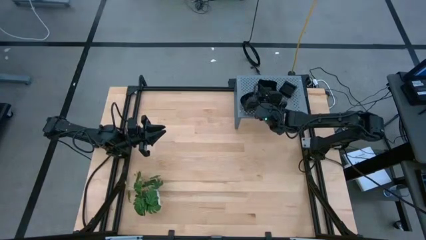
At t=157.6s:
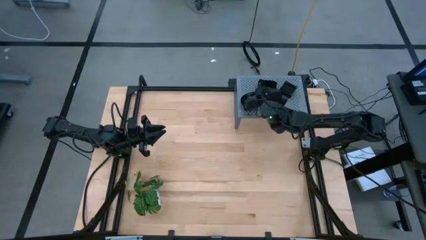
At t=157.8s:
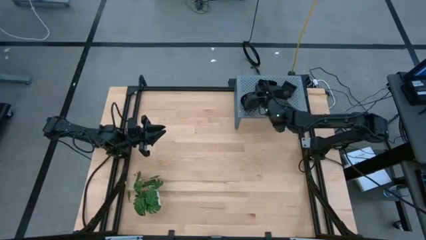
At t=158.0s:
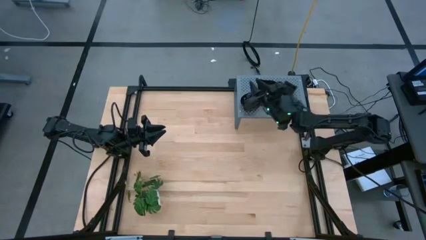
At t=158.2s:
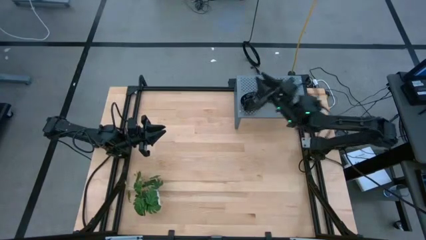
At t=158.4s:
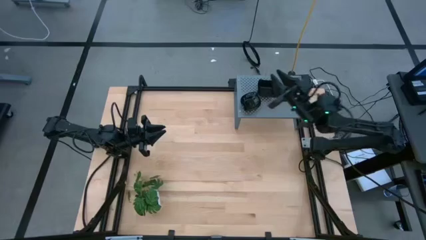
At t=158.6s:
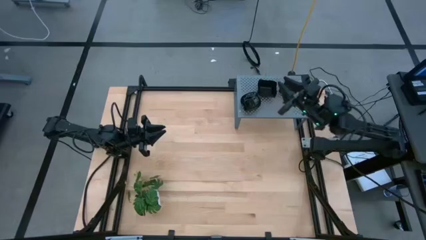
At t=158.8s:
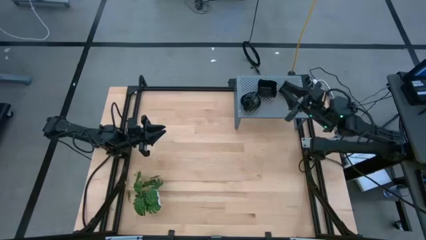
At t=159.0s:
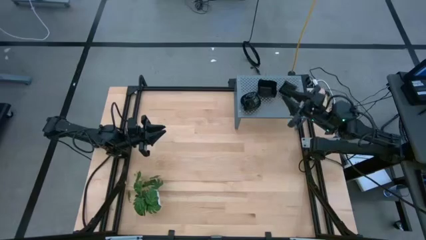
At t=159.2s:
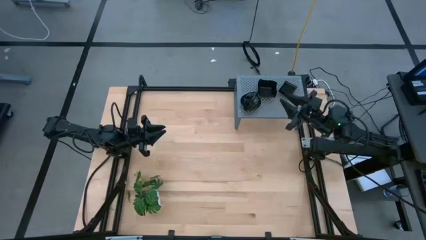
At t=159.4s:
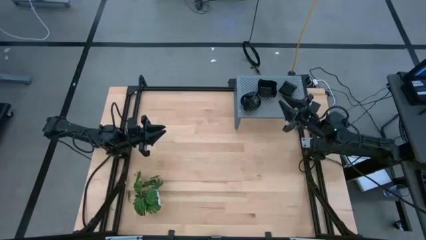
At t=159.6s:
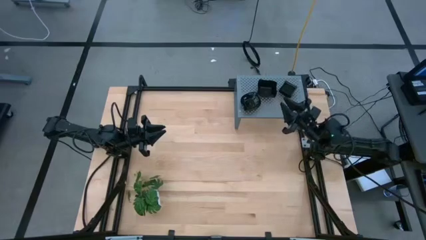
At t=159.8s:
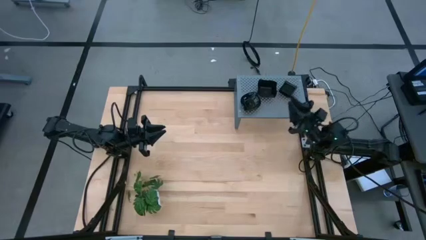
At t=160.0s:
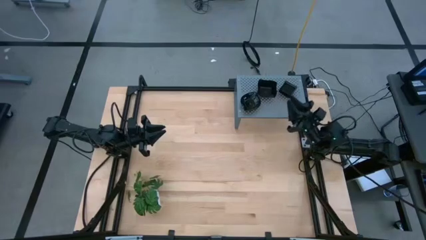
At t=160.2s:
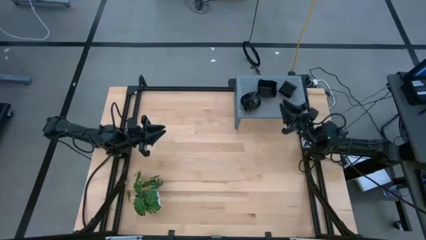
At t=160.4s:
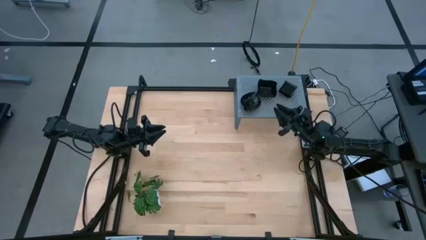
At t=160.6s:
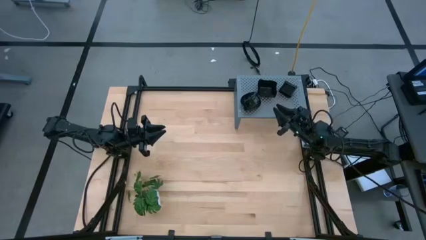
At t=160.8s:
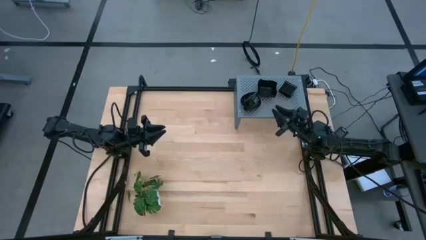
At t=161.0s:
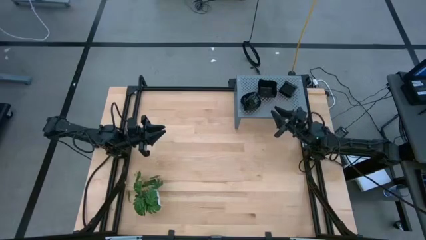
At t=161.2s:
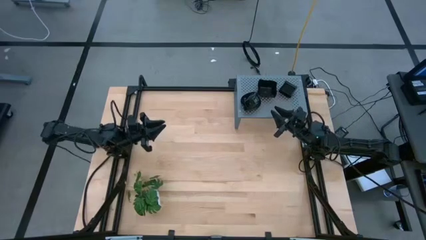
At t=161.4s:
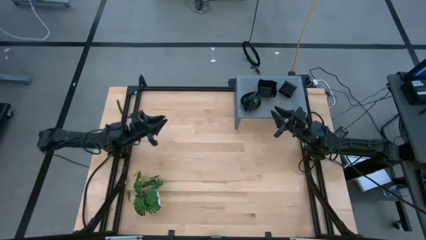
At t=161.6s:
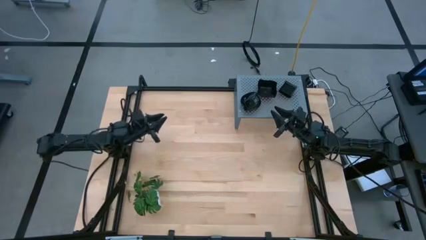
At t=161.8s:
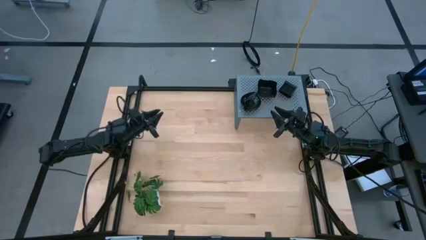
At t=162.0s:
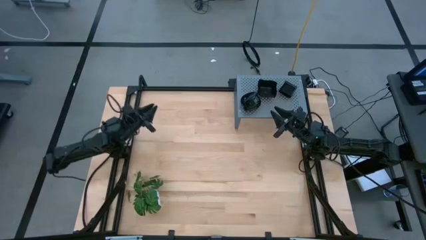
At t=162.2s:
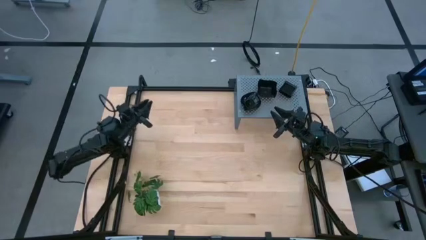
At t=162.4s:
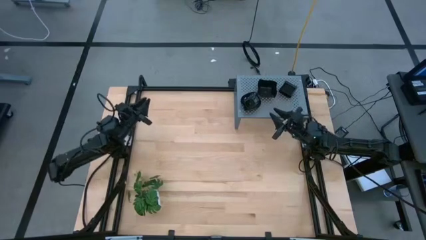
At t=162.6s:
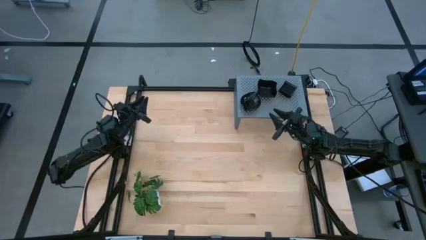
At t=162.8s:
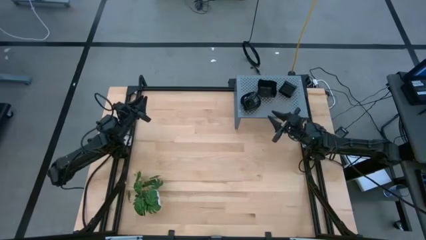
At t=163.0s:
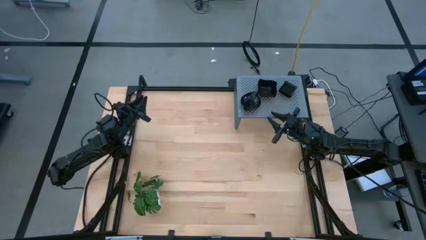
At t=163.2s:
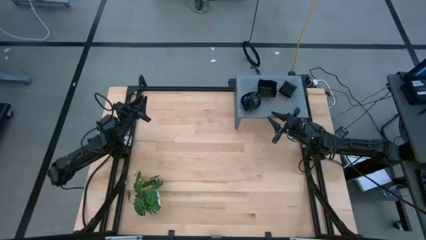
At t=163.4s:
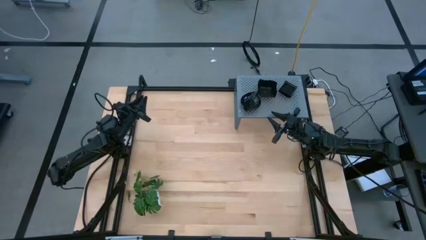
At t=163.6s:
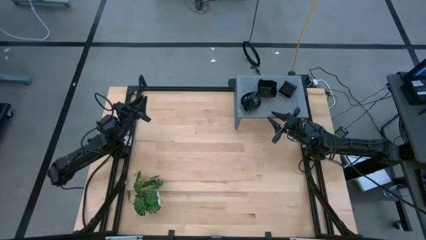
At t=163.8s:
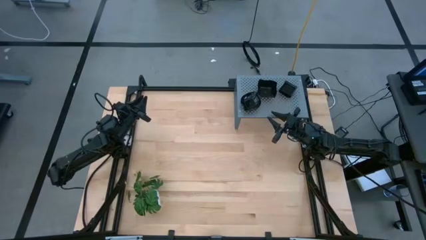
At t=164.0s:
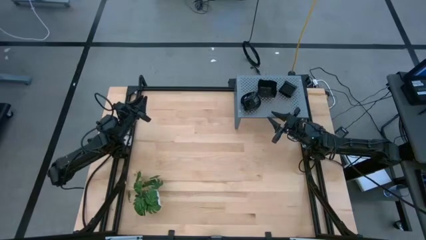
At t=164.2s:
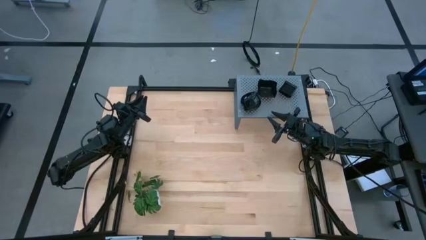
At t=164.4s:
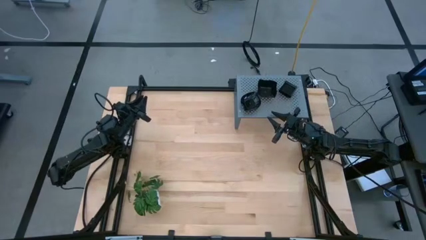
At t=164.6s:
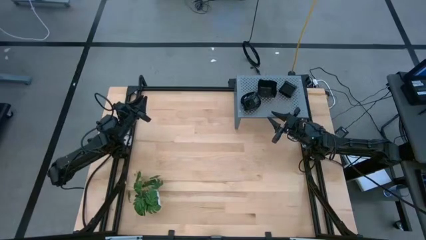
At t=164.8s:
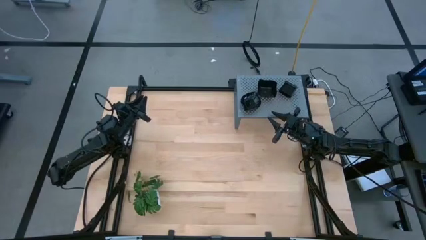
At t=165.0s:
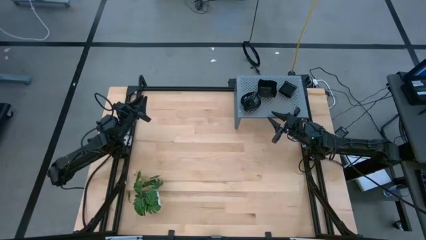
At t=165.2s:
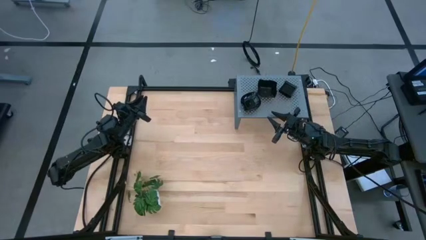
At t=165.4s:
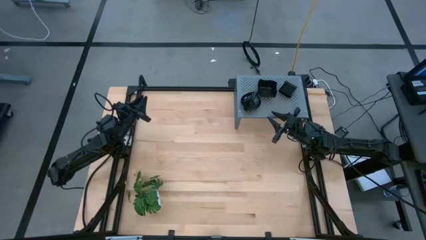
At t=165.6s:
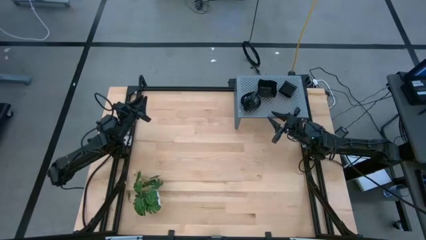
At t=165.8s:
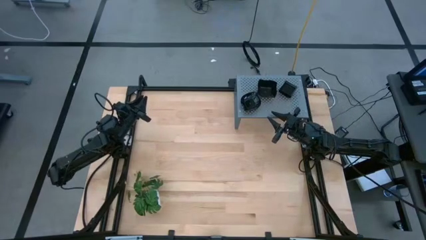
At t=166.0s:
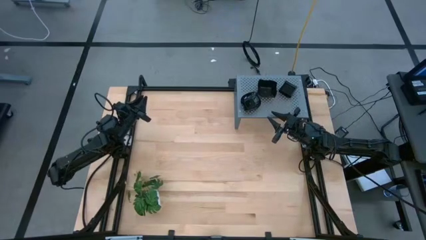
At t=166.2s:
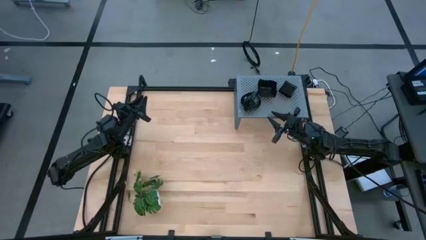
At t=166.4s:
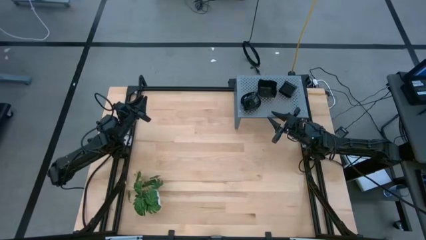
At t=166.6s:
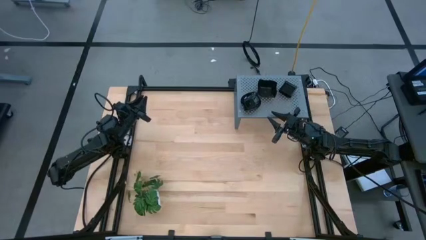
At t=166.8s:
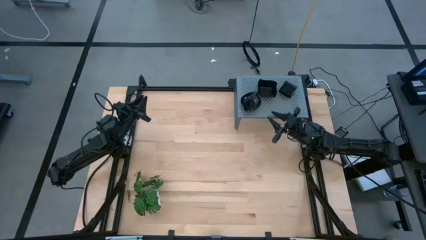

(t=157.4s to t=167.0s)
Task: Pick & Place Mini shaped plates
Return to Home Position

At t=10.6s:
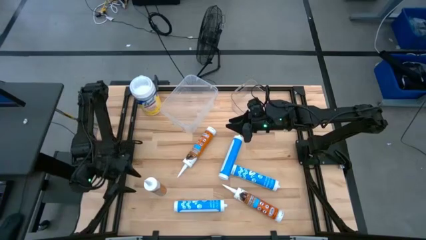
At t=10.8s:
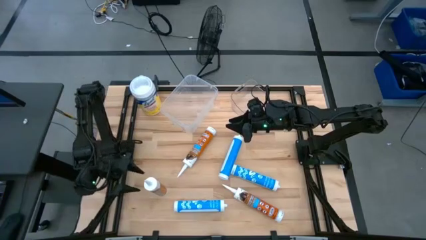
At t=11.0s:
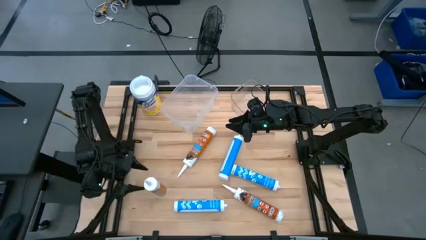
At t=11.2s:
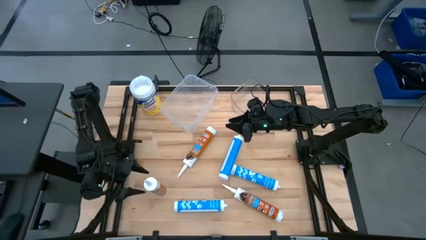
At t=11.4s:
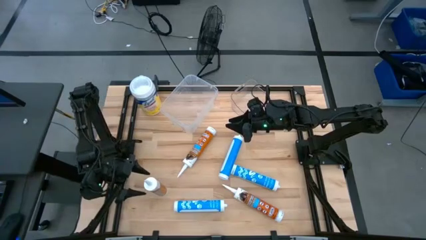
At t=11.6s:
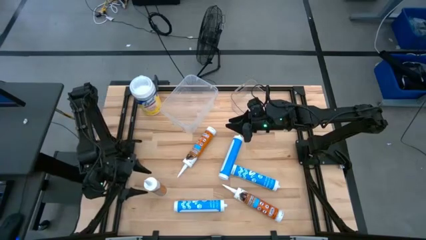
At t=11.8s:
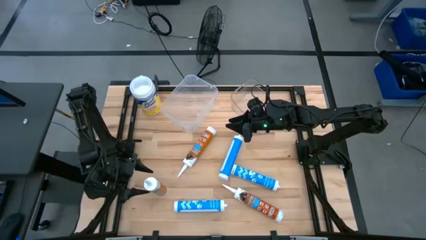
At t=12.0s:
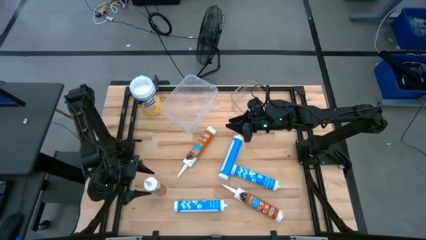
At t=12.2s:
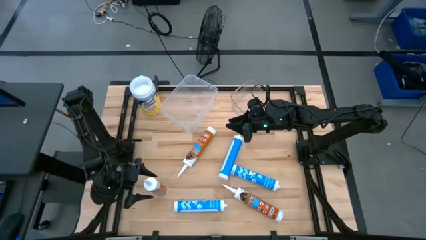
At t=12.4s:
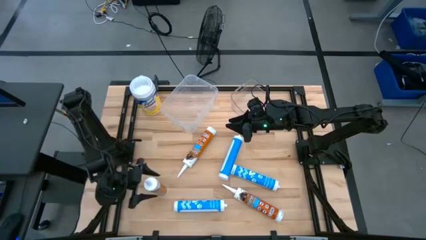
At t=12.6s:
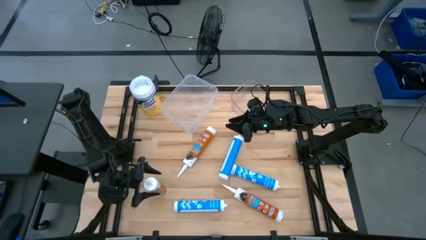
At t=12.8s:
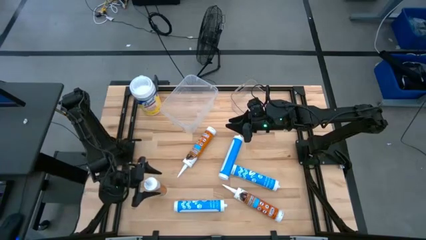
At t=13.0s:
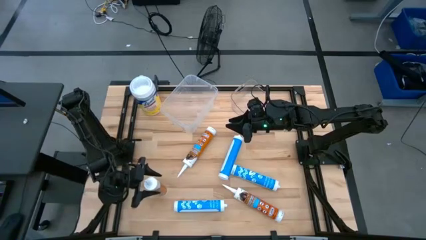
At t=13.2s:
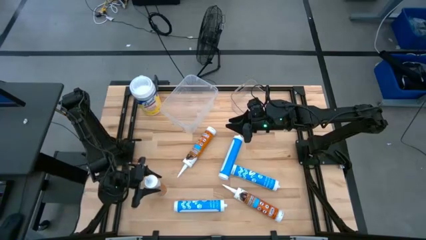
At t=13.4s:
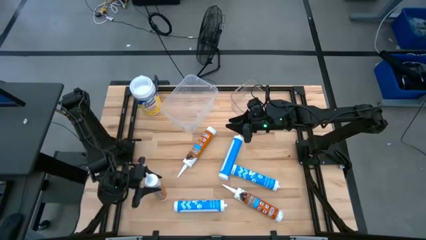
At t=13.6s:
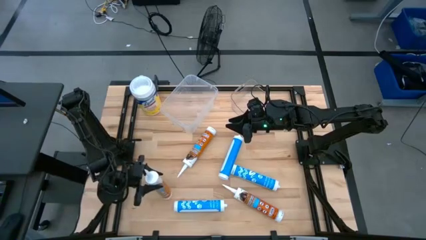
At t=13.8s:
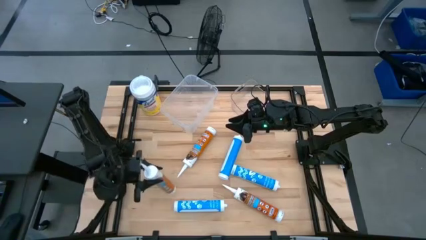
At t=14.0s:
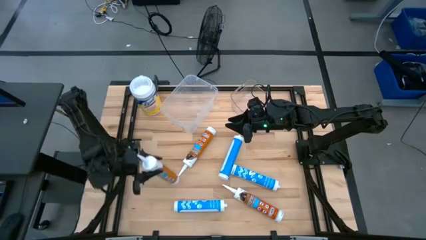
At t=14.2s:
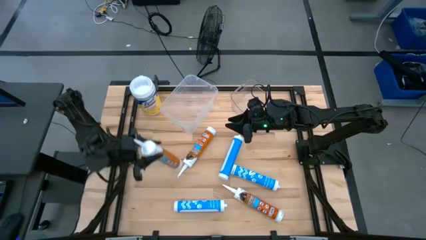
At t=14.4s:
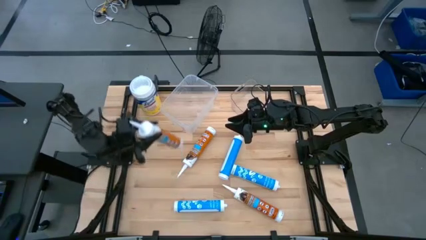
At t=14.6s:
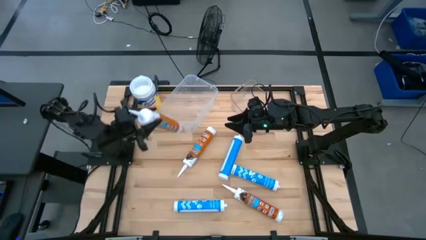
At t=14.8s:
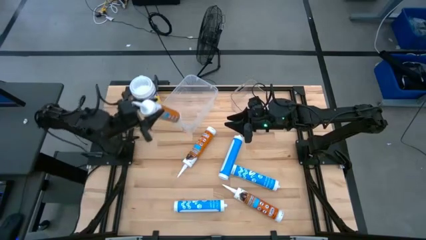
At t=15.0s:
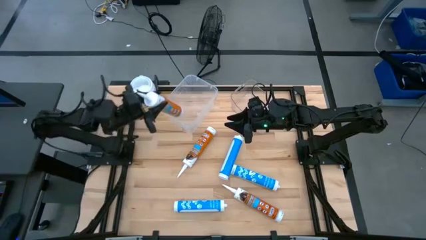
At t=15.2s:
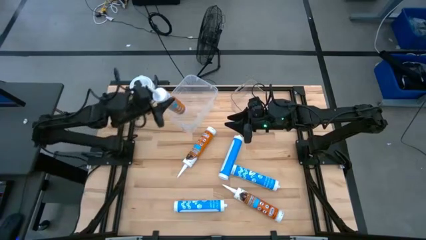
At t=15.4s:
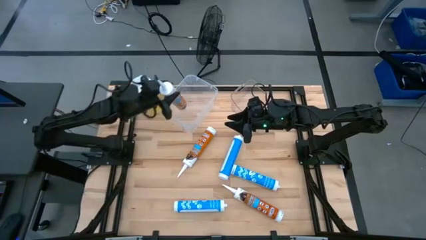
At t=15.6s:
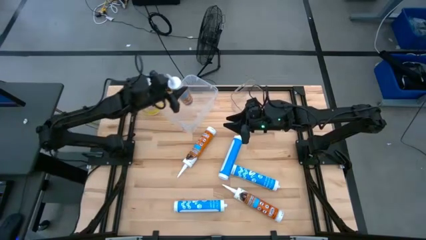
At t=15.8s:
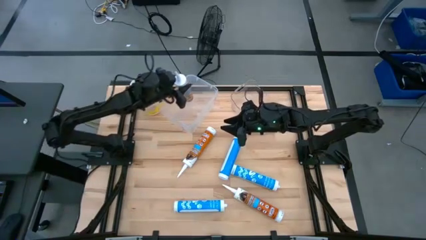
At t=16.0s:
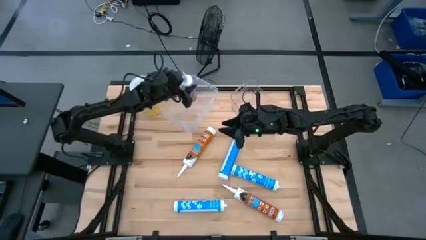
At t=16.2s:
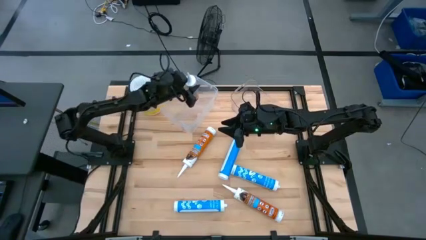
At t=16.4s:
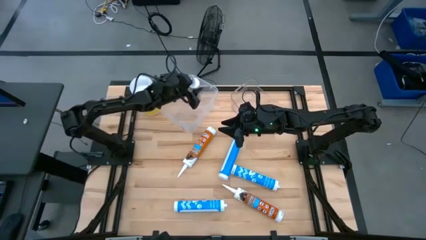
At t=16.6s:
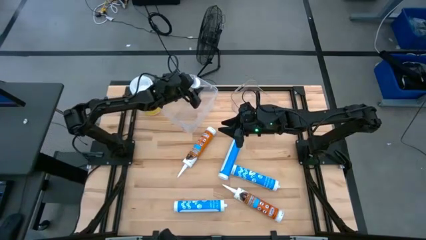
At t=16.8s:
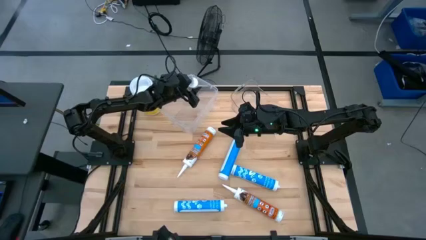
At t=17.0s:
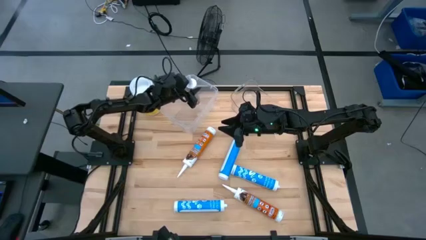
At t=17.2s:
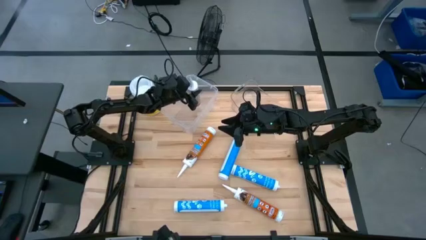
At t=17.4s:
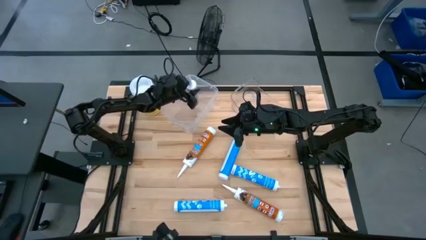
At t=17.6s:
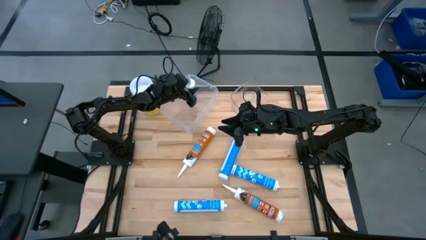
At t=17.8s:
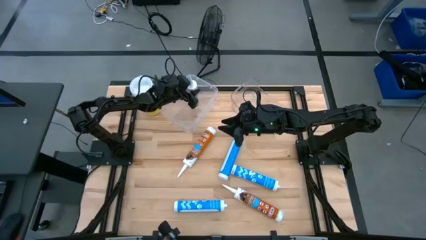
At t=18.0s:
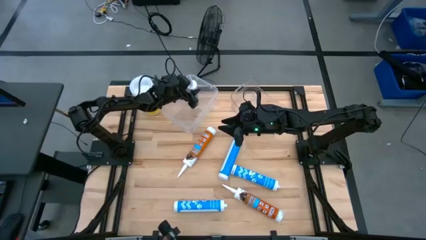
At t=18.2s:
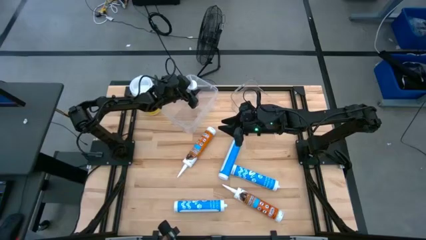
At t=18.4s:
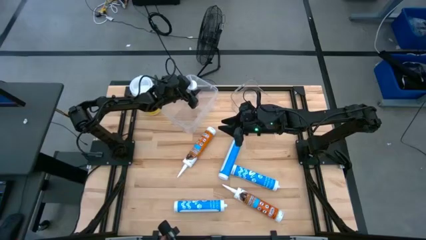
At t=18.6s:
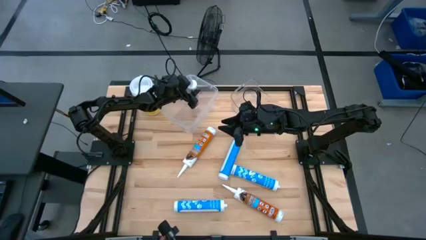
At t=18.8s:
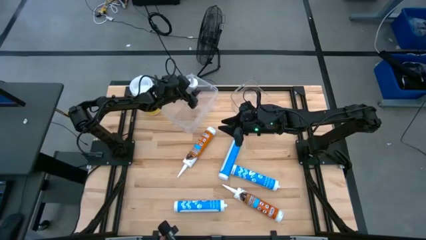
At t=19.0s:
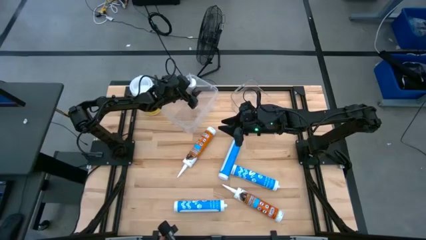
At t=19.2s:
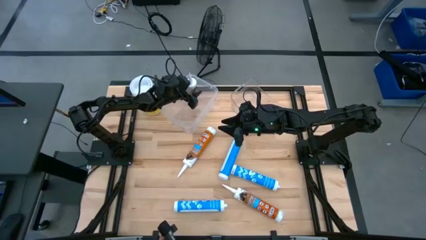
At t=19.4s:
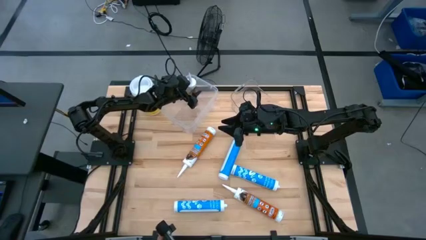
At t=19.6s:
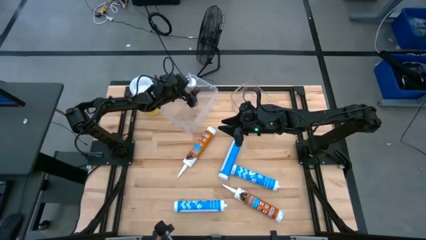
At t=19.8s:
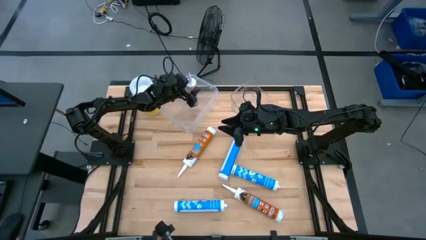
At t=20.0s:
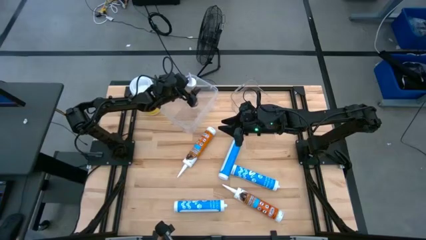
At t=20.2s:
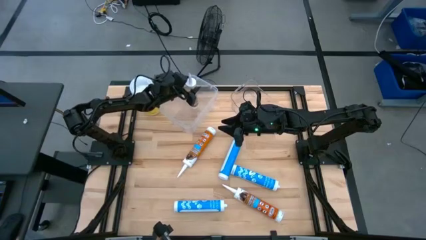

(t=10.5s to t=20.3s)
Task: Pick & place silicon tubes, Sealant and Lysol wipes
Put the left brown sealant into the white transparent bin
